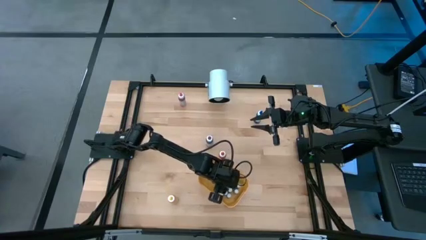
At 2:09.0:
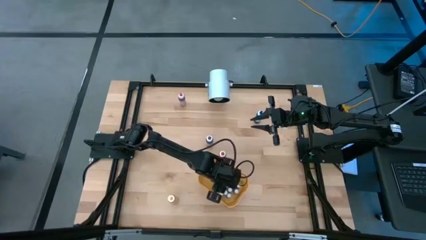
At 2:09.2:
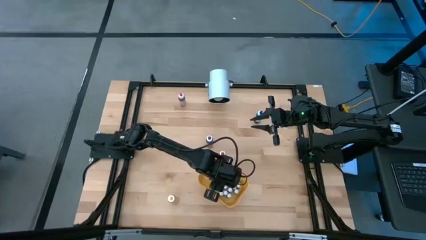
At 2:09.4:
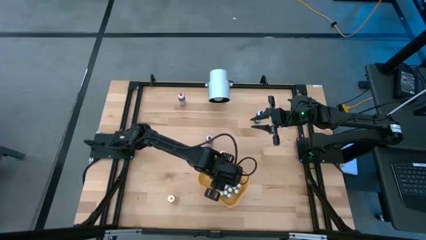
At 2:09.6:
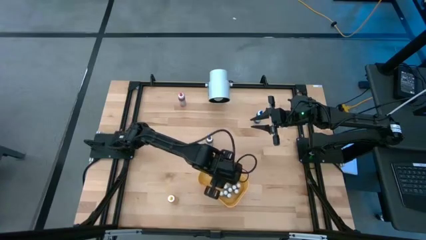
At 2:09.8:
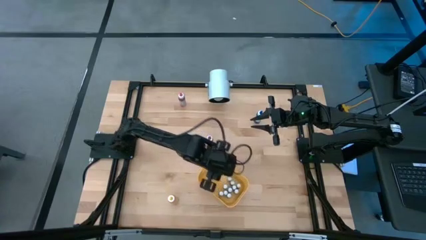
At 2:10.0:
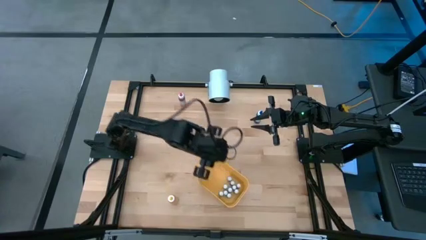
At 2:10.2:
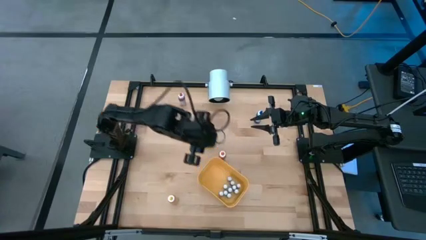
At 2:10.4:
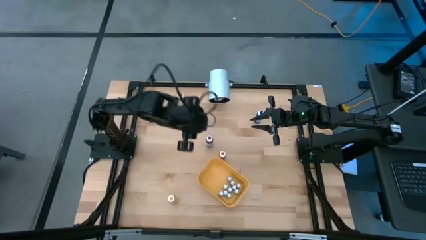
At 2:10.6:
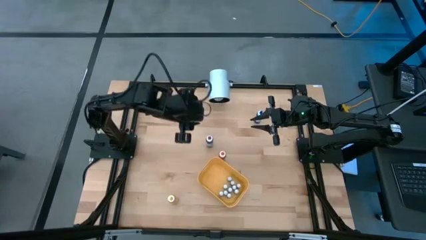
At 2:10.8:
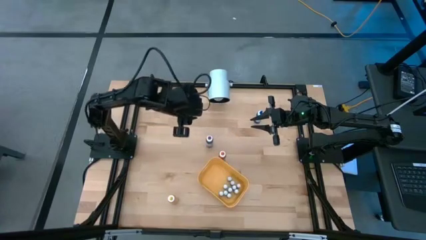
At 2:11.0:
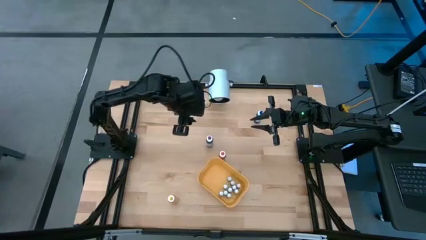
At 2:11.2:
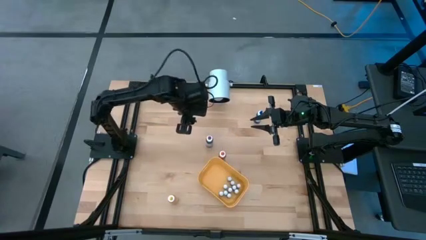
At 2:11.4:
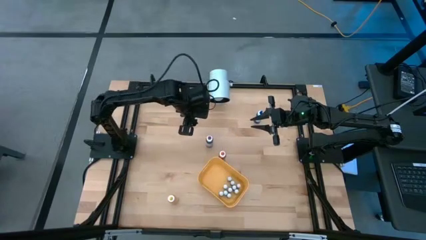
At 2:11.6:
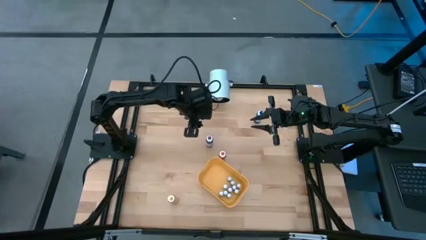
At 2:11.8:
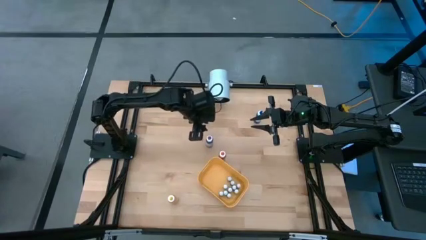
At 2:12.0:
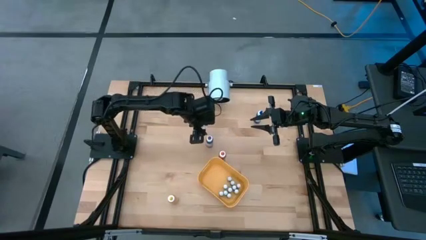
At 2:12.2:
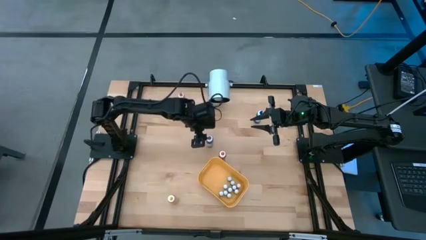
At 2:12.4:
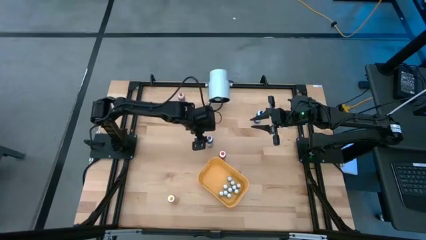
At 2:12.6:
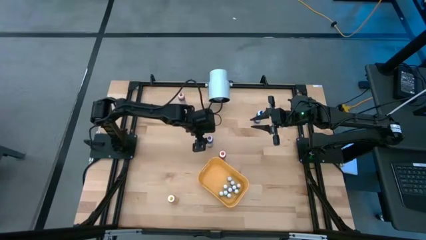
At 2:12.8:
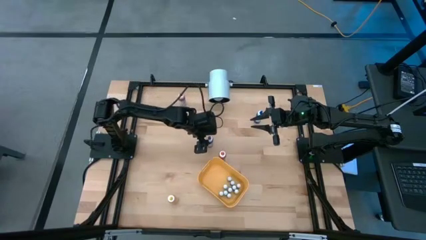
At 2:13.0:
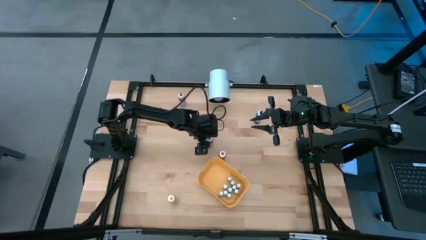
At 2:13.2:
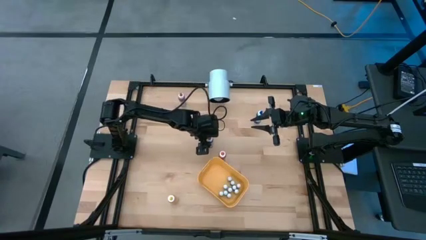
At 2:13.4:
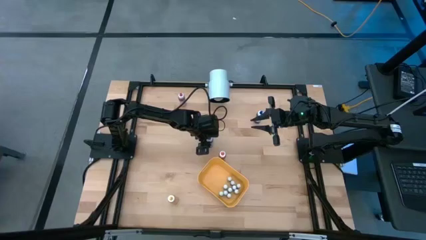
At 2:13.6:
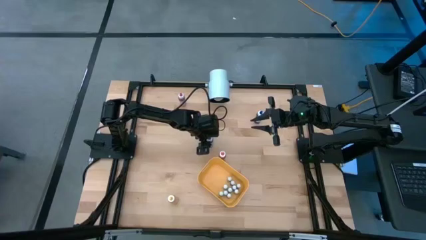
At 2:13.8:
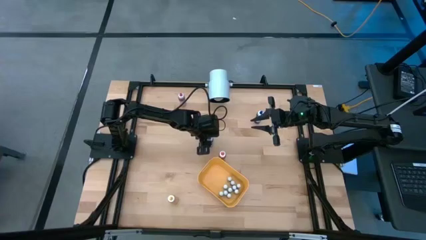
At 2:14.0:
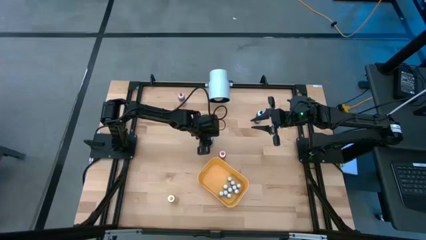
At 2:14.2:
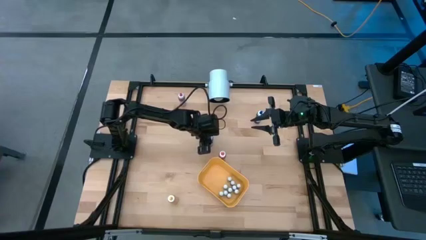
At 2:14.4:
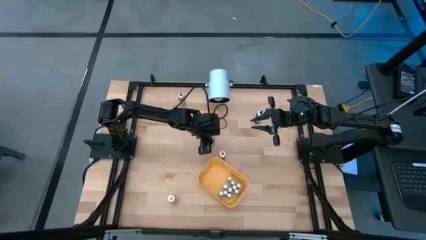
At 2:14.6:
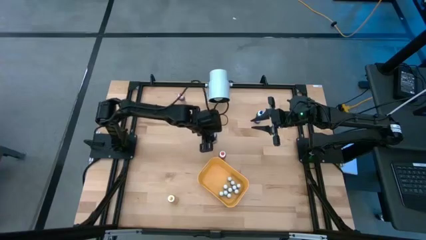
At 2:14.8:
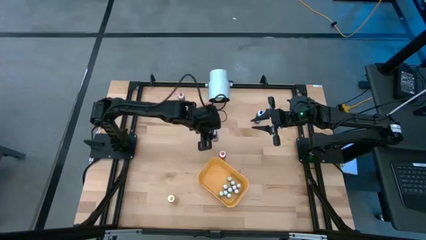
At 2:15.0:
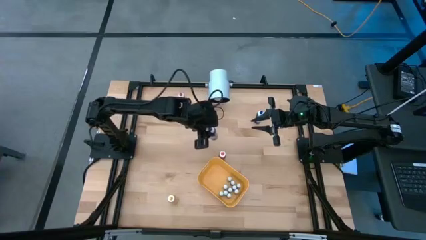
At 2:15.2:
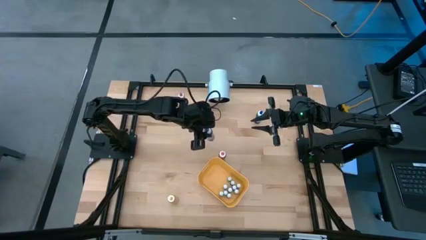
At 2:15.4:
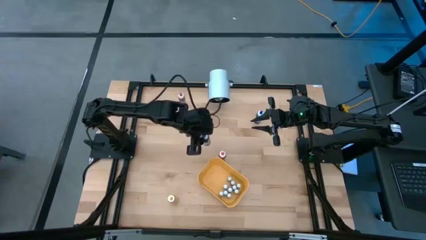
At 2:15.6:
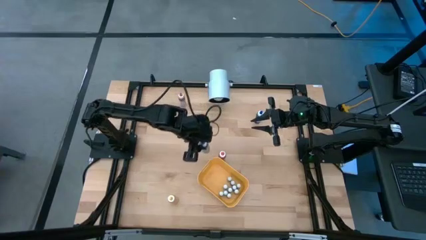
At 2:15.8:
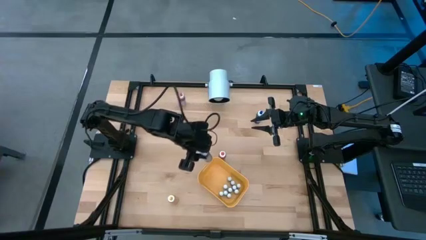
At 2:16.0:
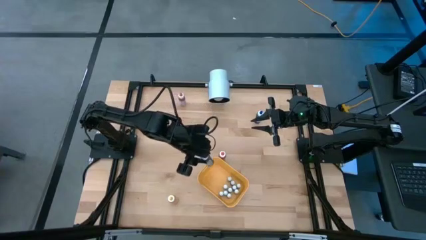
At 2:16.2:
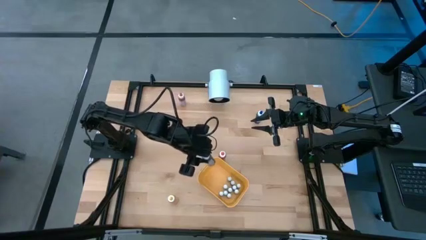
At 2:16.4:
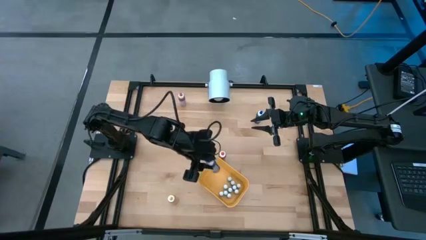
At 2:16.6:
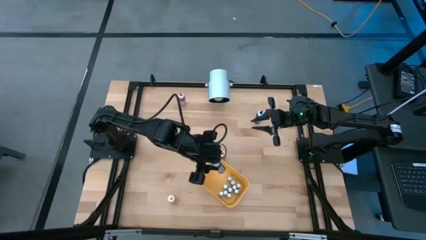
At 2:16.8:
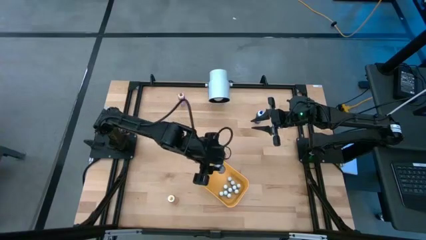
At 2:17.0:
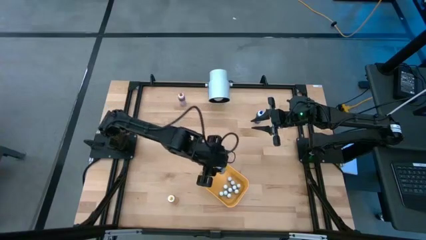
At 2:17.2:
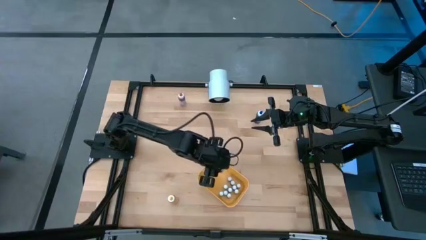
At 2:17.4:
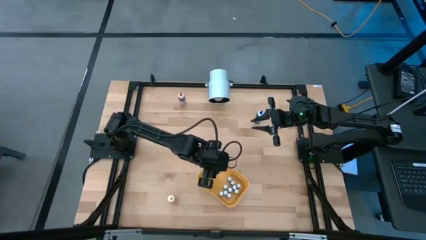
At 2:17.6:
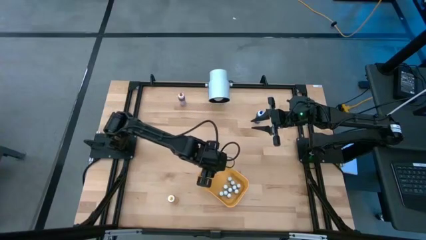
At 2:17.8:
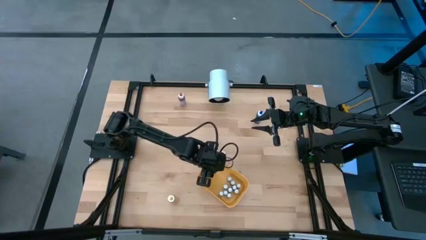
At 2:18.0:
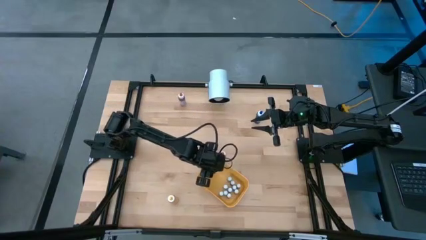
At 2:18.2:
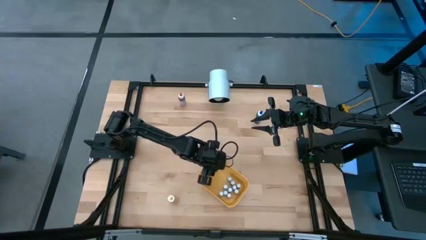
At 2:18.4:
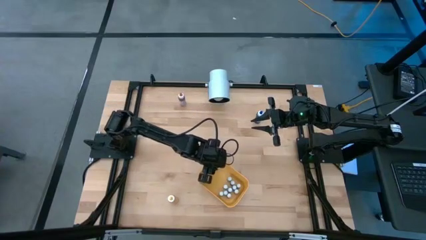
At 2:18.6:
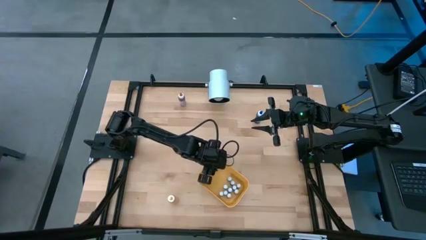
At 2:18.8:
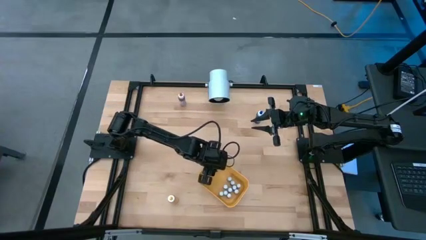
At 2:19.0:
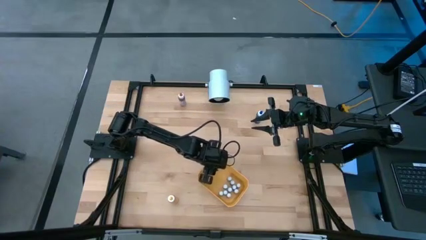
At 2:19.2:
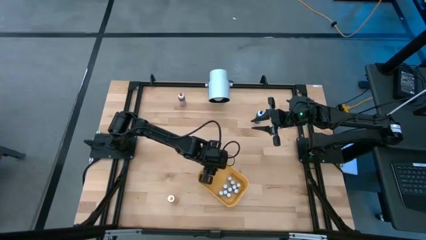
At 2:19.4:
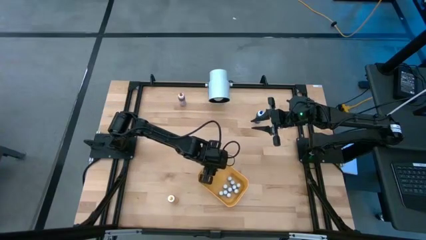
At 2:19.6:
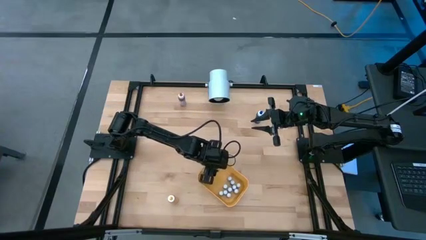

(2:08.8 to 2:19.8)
Task: Pick & Place food coloring
Put the large violet food coloring bottle into the yellow container
